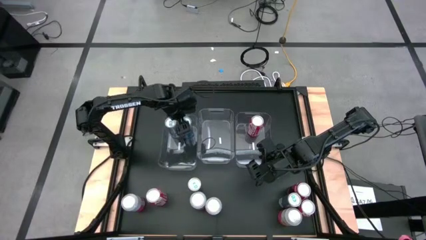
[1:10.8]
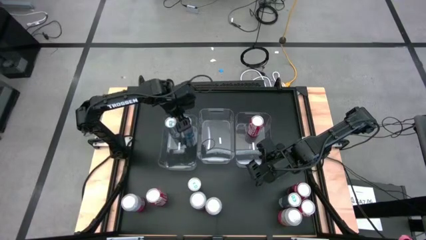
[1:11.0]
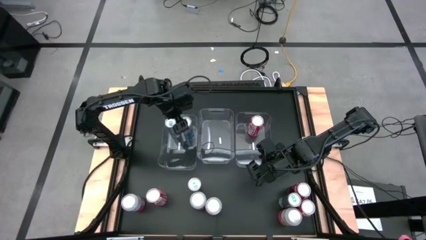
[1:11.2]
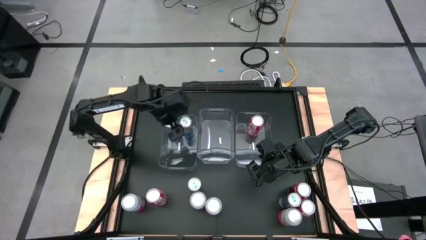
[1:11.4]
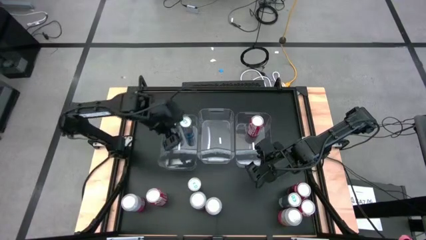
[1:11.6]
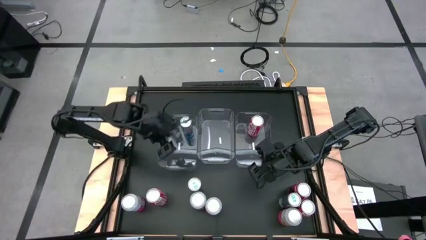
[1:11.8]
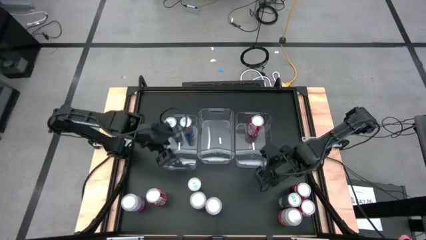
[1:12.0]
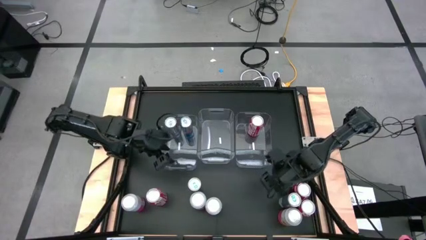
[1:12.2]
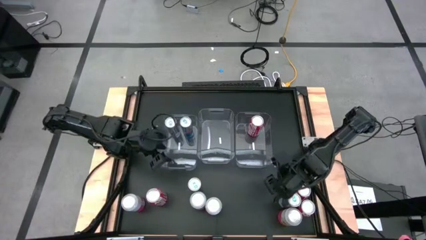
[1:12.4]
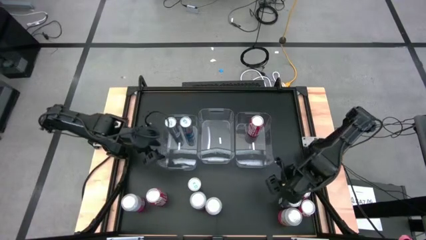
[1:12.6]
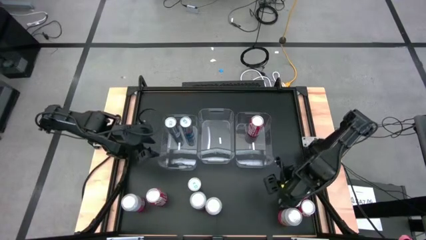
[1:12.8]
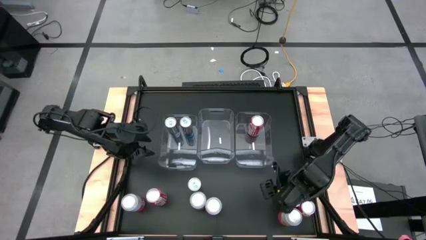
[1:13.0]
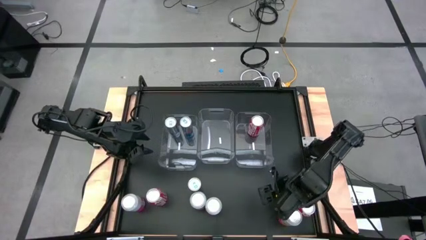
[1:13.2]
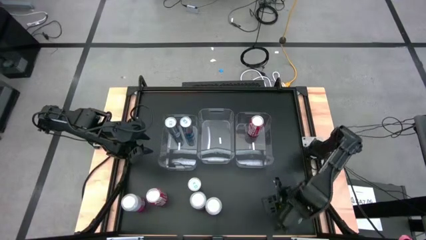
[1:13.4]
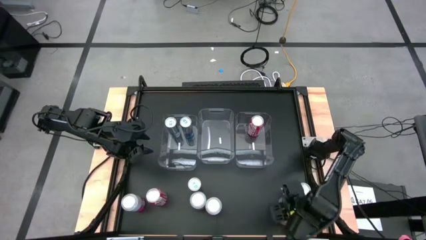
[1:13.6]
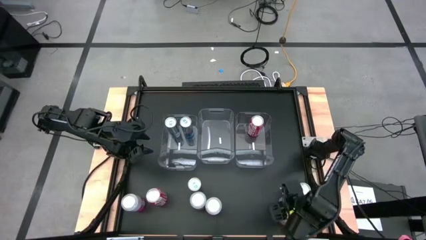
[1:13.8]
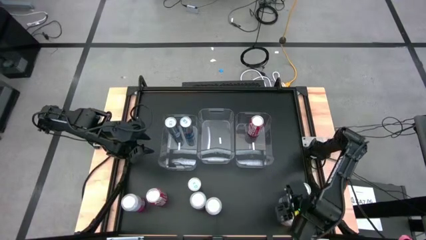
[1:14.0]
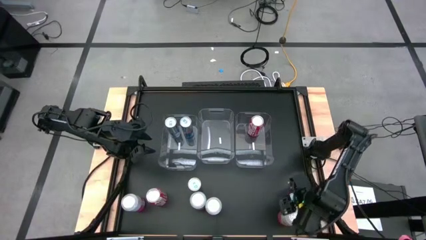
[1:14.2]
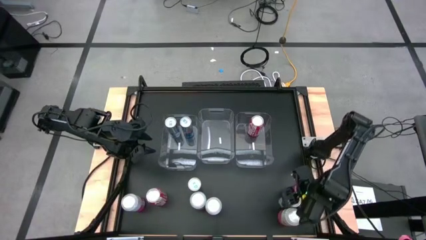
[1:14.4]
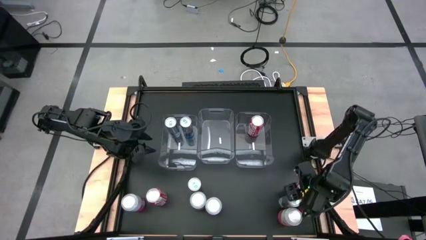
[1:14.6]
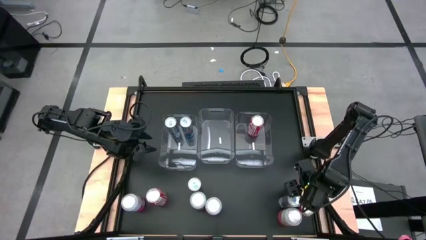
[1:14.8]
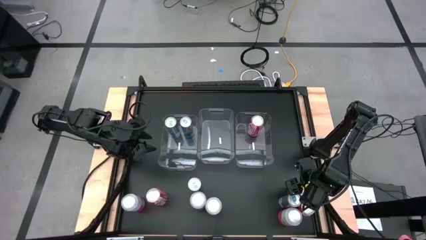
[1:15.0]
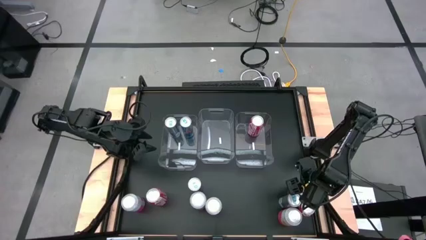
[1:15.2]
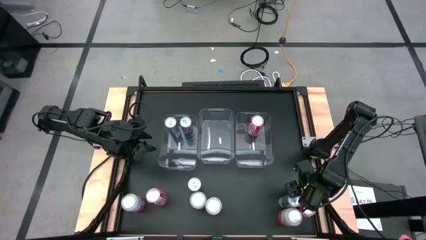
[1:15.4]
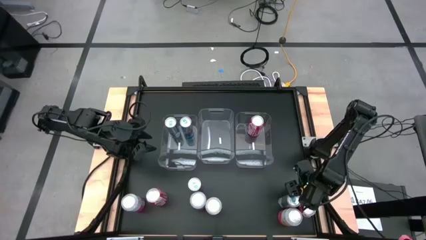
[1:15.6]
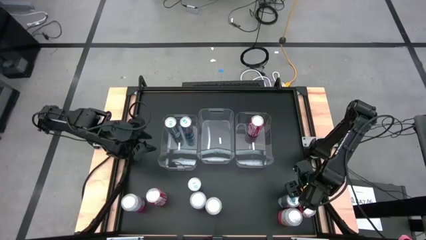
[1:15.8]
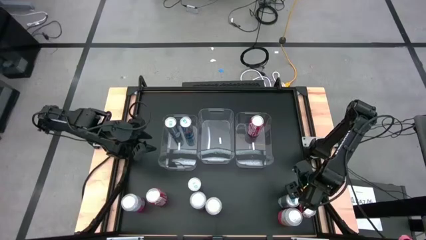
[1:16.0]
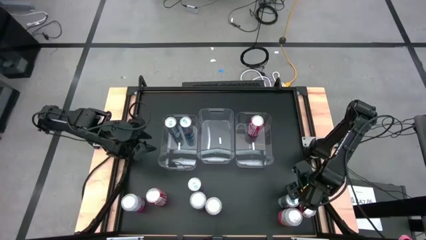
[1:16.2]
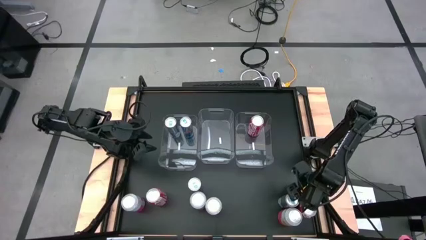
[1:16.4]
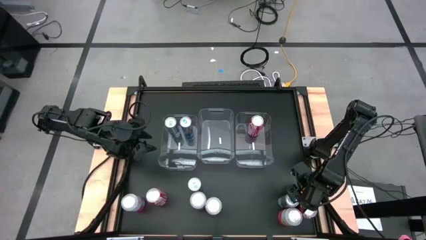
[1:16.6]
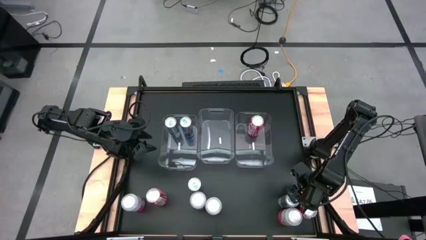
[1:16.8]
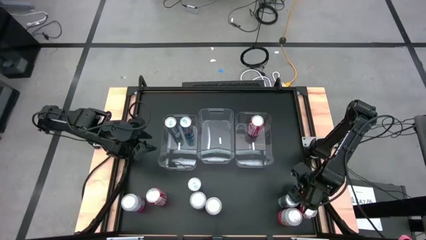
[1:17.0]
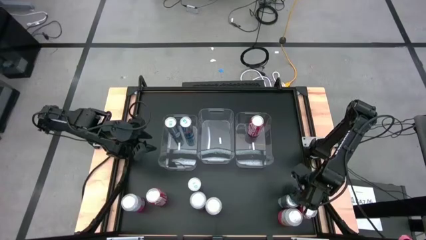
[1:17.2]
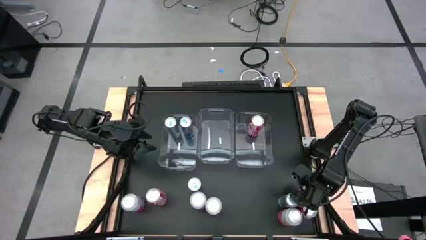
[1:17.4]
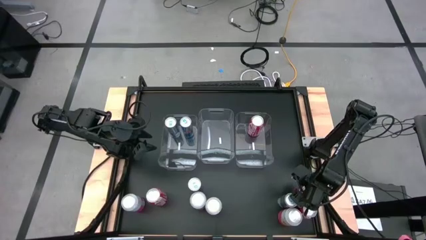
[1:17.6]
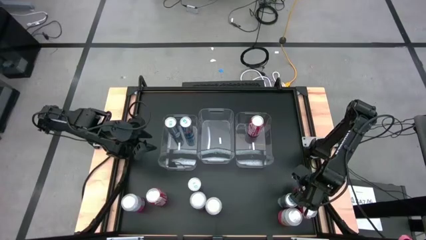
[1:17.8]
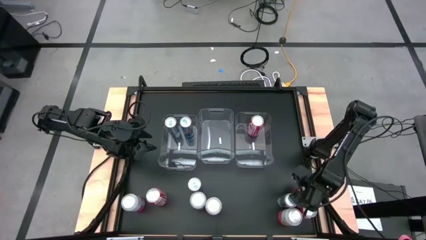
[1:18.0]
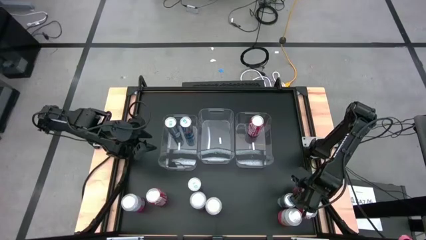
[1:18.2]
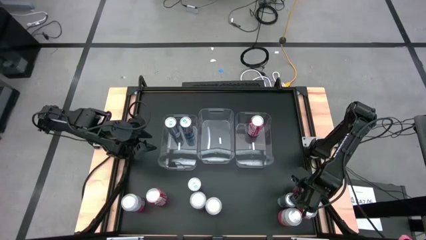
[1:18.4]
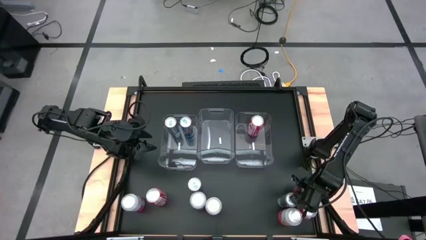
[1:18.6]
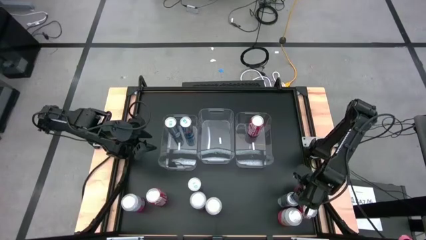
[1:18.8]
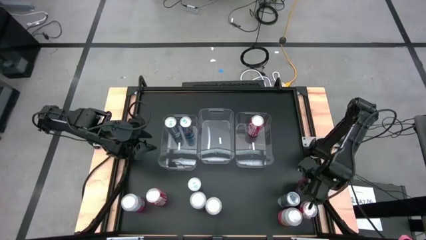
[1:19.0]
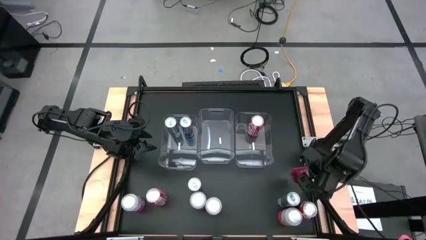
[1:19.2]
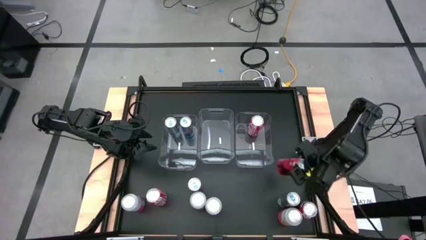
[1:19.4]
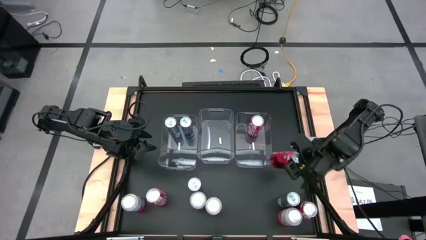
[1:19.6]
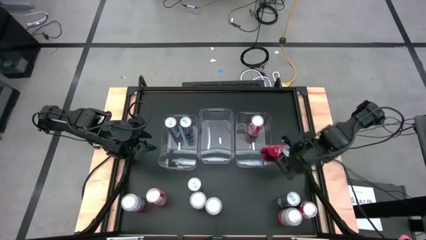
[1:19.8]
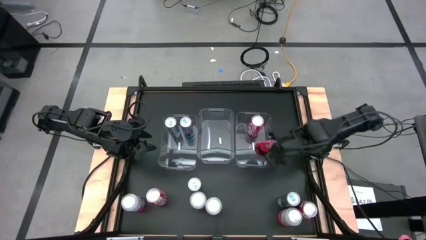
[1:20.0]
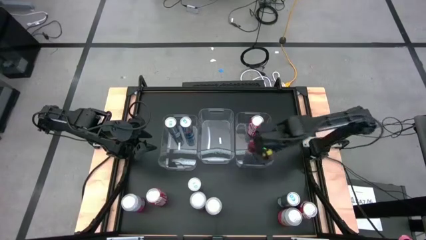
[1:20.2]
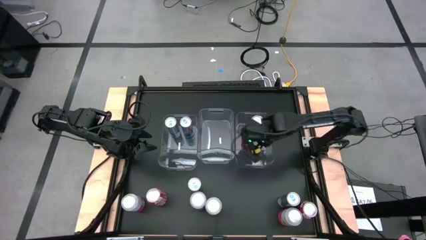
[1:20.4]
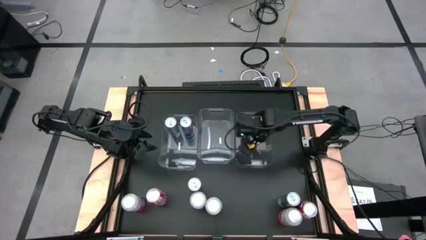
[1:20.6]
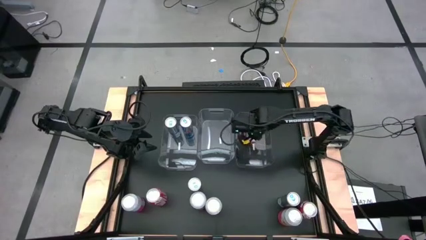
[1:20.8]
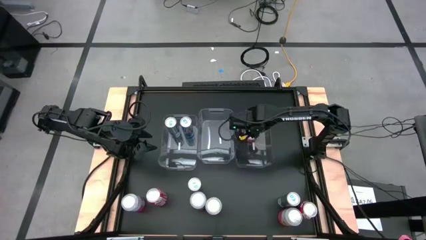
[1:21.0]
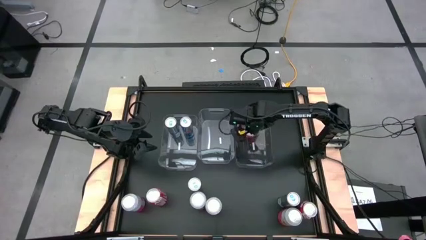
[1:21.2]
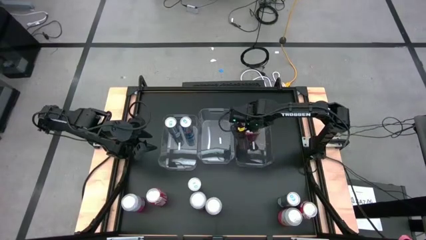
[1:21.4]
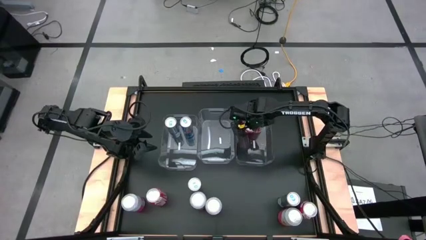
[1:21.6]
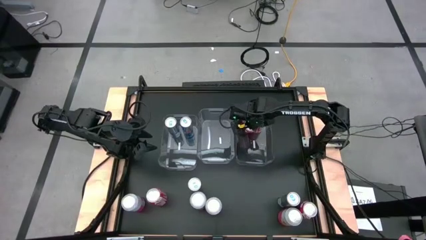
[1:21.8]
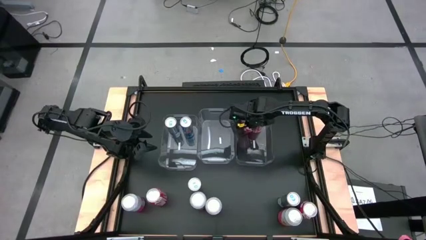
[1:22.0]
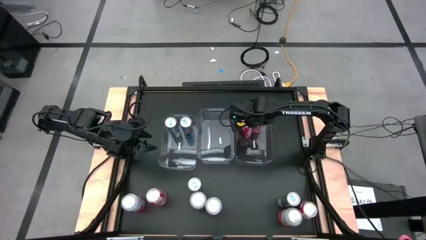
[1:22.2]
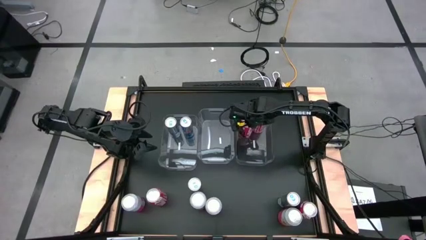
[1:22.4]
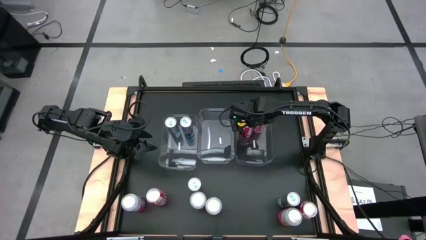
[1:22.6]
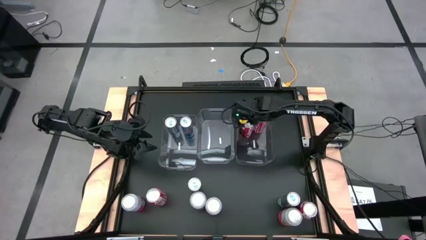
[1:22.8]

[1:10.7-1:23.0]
Task: Sort soda cans
Put the bottom right red soda can into the right transparent bin

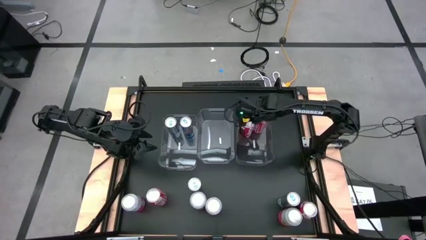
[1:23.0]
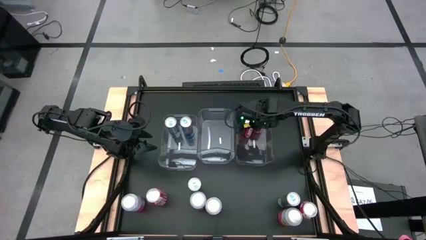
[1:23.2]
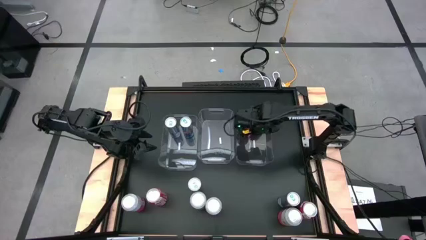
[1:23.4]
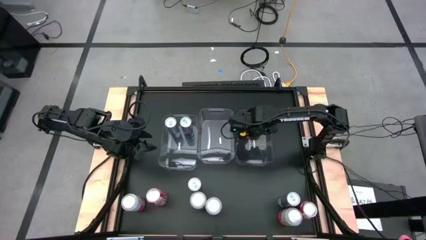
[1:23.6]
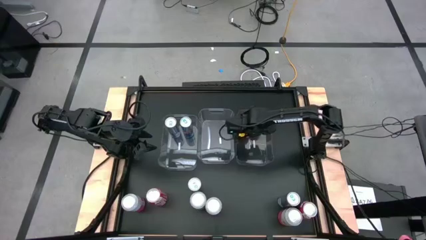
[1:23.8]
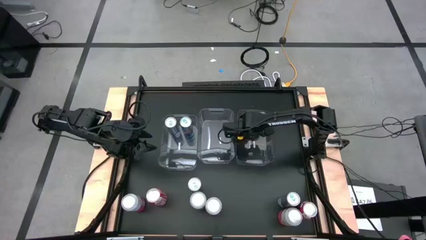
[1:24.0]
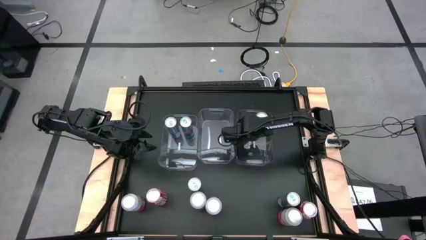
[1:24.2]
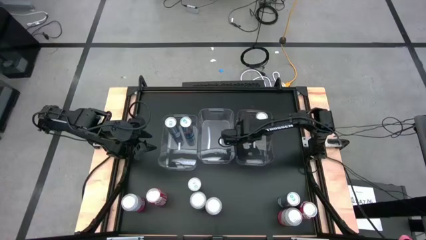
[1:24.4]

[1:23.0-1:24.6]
Adjust the bottom right red soda can in the right transparent bin

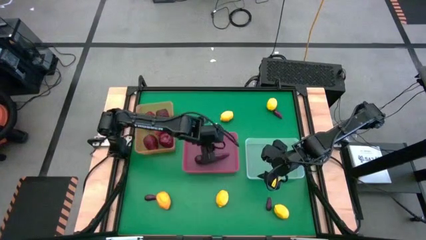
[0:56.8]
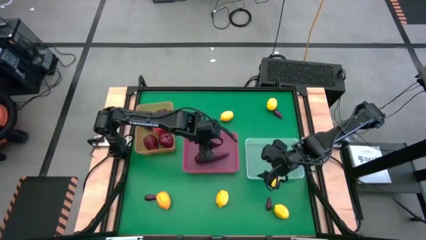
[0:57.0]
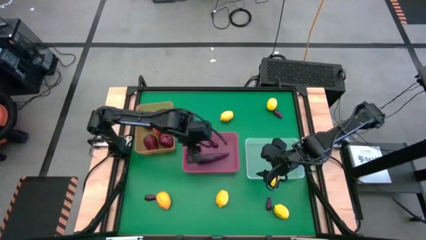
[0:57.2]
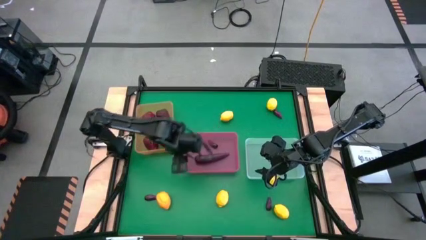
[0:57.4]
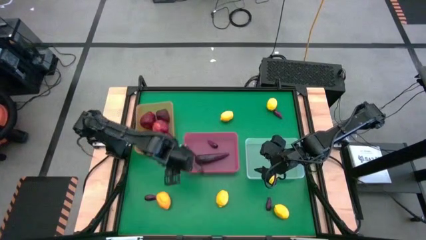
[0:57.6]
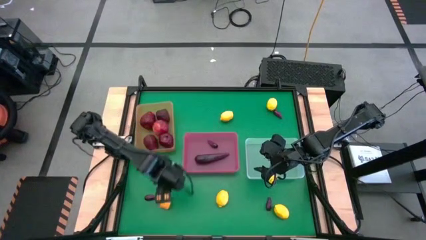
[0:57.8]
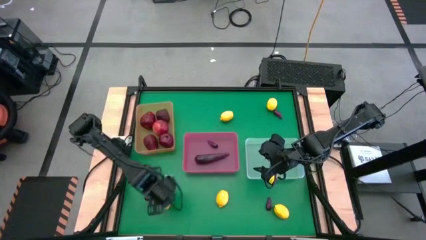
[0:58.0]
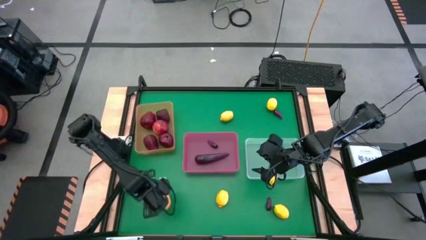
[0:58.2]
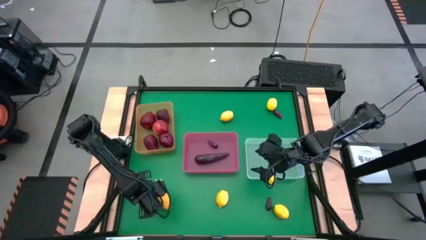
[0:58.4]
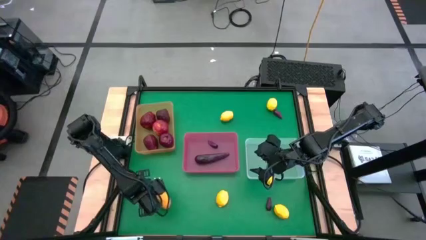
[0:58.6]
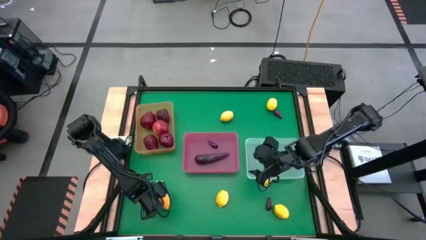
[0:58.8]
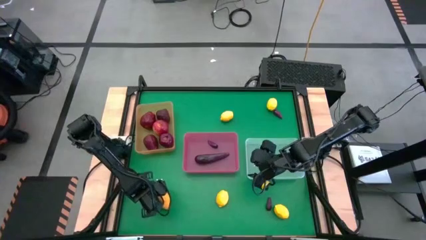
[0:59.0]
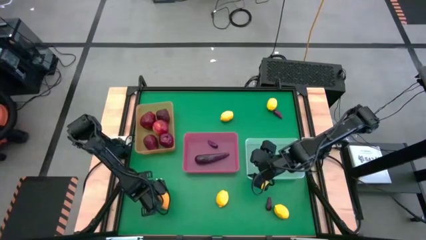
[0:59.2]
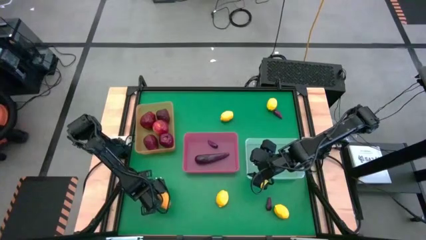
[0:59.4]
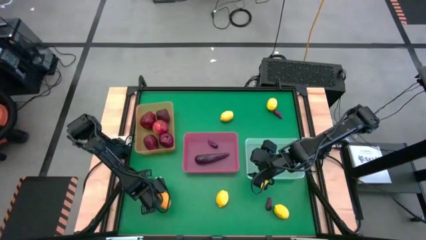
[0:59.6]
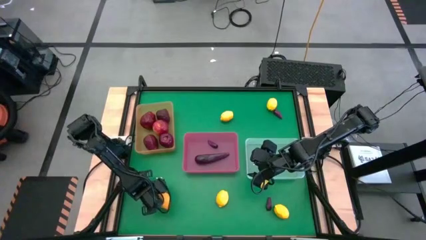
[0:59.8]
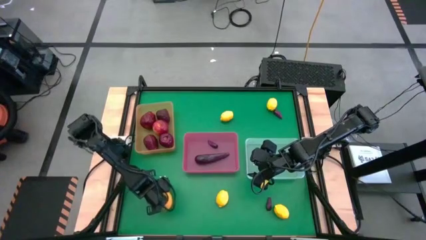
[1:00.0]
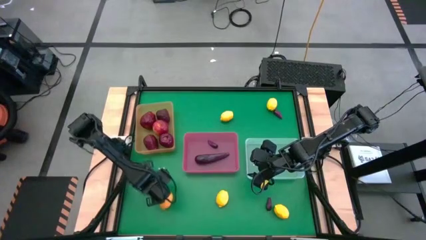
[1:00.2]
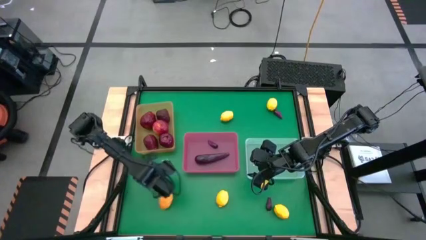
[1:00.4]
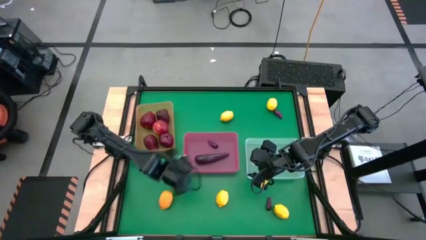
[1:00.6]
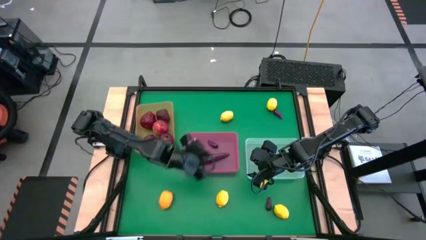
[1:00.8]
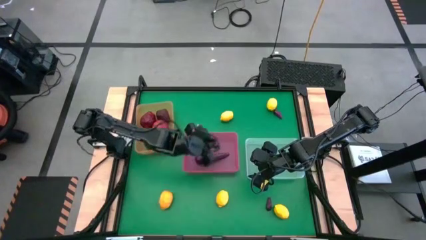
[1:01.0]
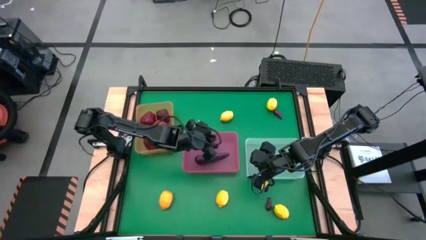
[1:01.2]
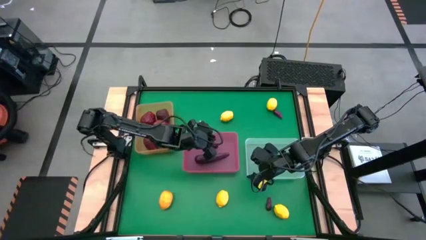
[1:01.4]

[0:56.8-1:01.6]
Task: Sort produce into baskets
Put the violet eggplant into the pink bin
